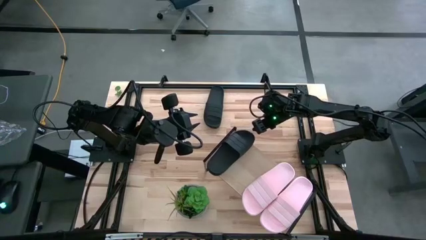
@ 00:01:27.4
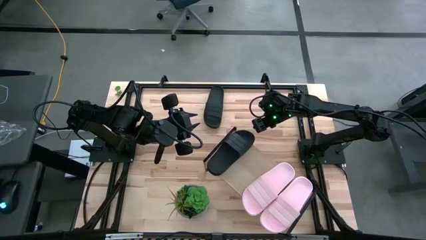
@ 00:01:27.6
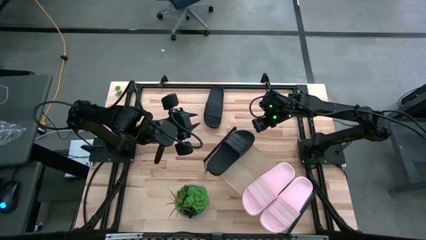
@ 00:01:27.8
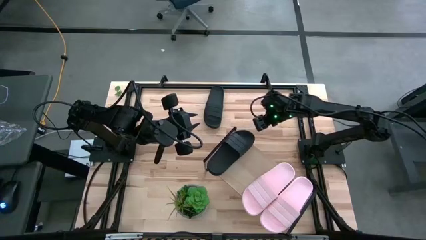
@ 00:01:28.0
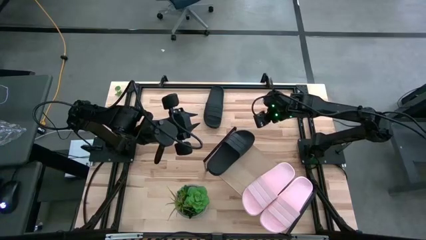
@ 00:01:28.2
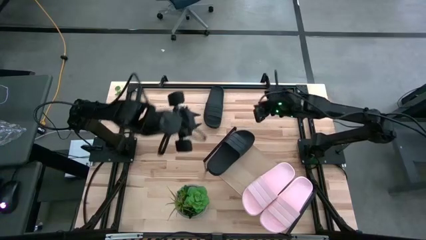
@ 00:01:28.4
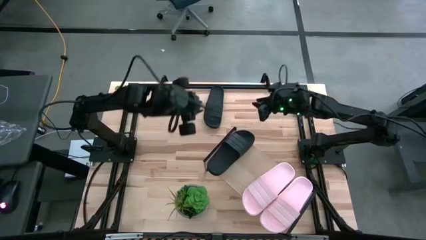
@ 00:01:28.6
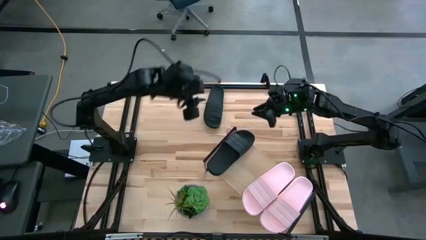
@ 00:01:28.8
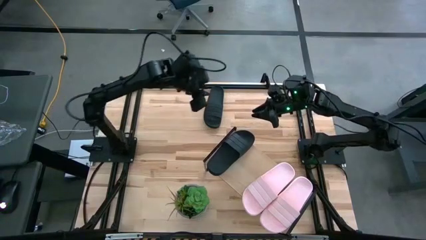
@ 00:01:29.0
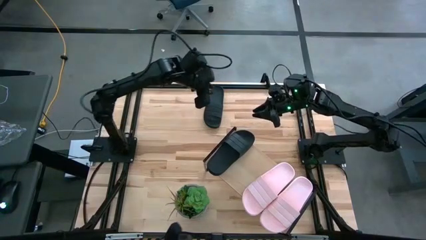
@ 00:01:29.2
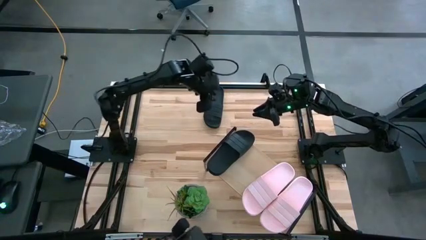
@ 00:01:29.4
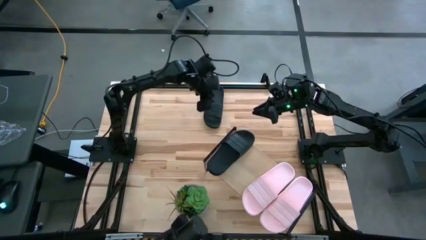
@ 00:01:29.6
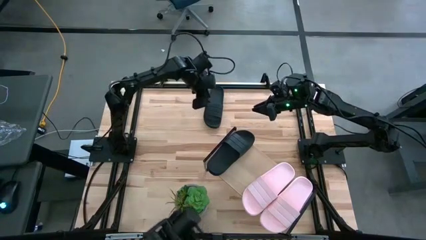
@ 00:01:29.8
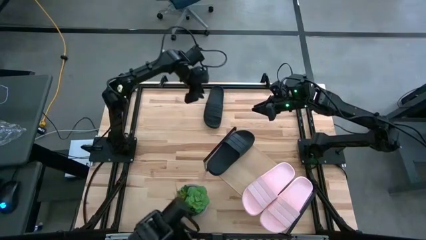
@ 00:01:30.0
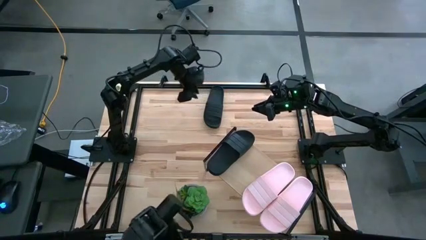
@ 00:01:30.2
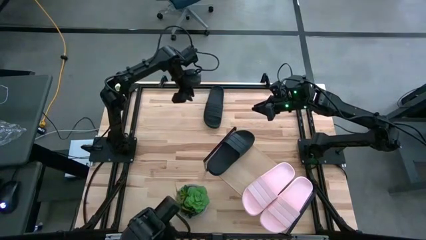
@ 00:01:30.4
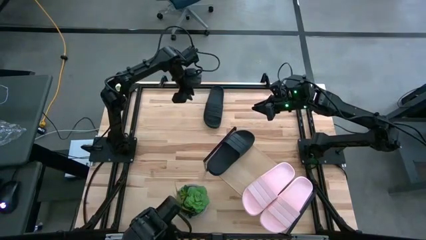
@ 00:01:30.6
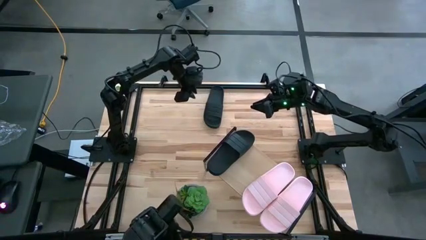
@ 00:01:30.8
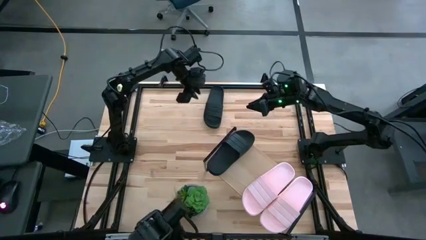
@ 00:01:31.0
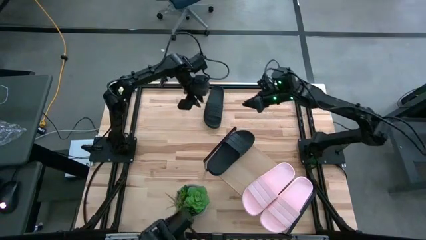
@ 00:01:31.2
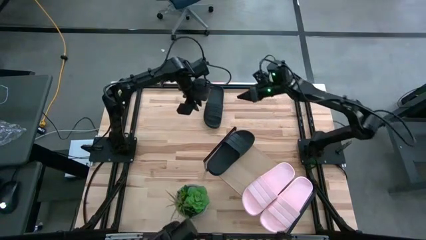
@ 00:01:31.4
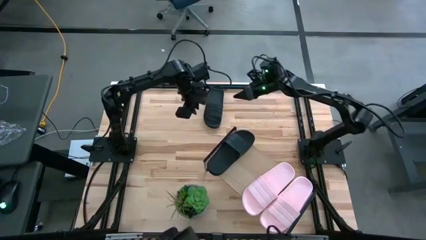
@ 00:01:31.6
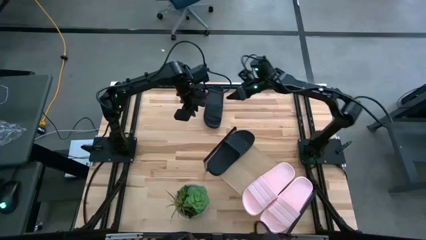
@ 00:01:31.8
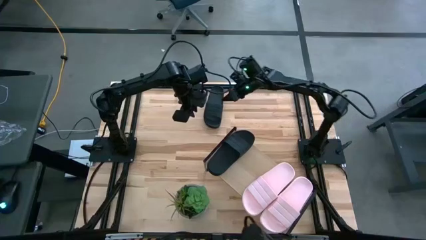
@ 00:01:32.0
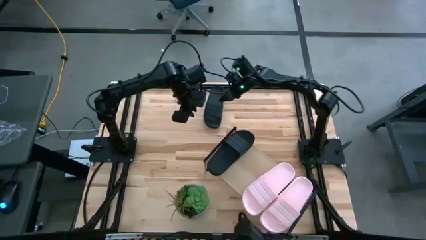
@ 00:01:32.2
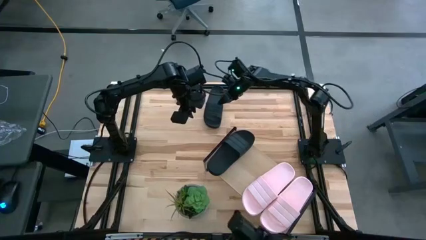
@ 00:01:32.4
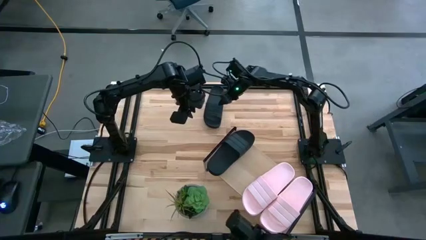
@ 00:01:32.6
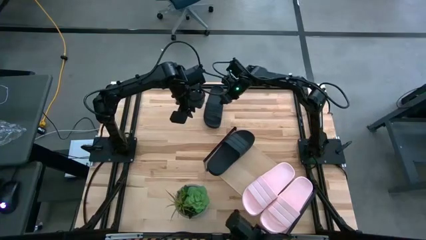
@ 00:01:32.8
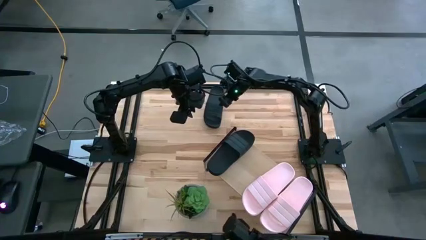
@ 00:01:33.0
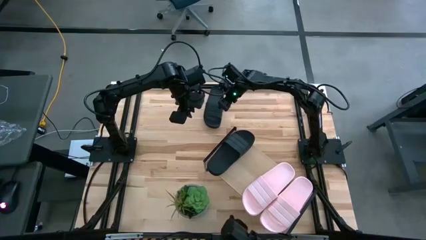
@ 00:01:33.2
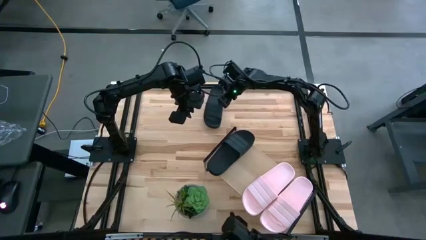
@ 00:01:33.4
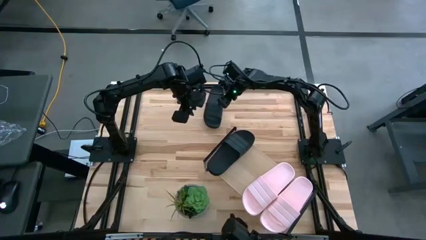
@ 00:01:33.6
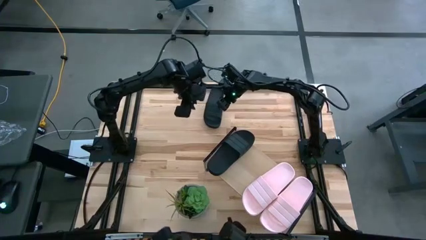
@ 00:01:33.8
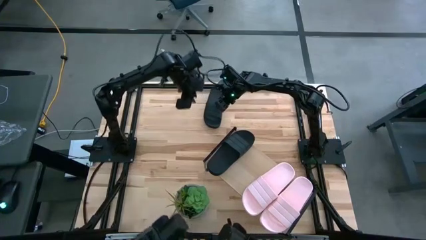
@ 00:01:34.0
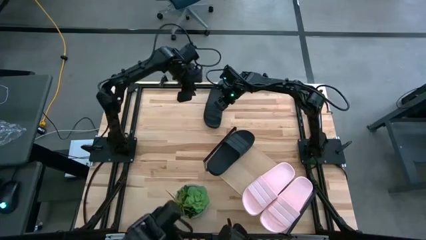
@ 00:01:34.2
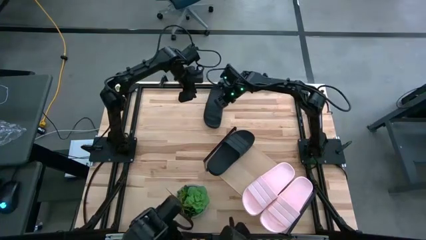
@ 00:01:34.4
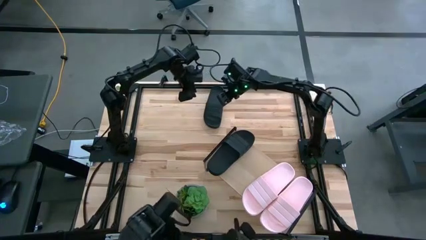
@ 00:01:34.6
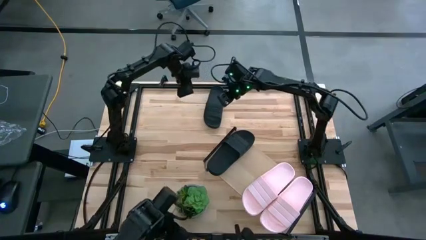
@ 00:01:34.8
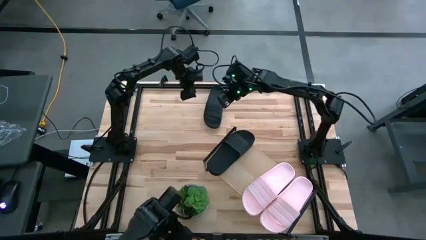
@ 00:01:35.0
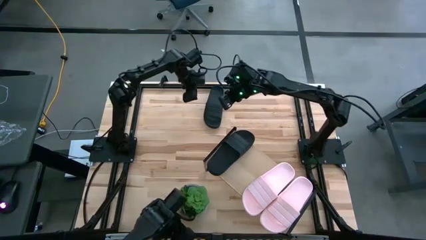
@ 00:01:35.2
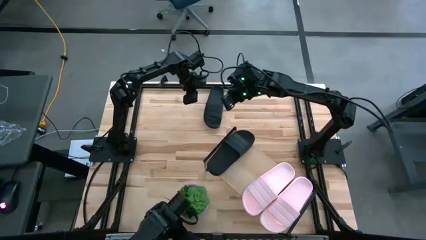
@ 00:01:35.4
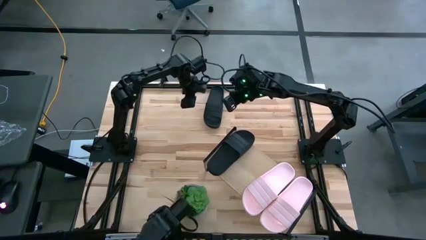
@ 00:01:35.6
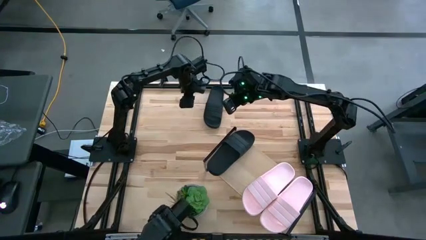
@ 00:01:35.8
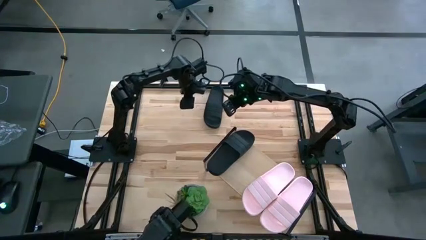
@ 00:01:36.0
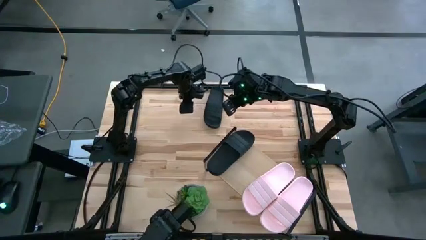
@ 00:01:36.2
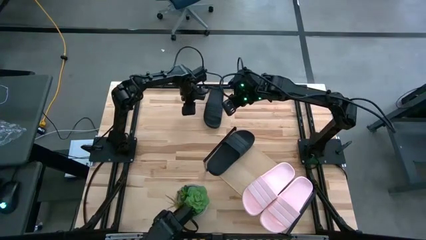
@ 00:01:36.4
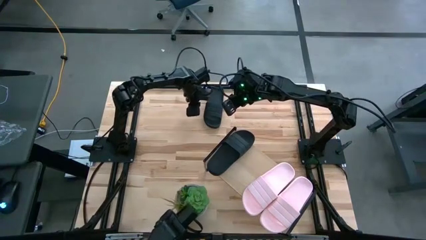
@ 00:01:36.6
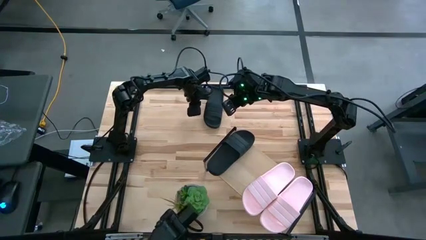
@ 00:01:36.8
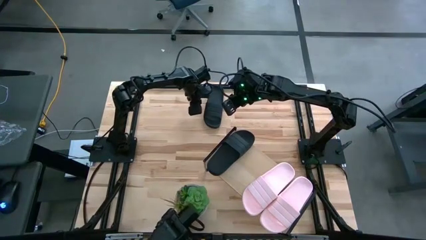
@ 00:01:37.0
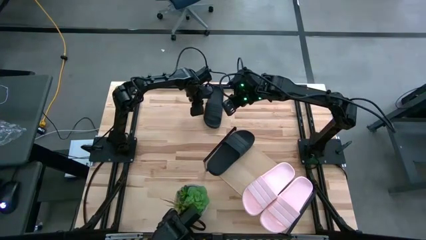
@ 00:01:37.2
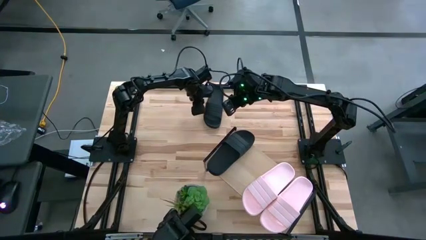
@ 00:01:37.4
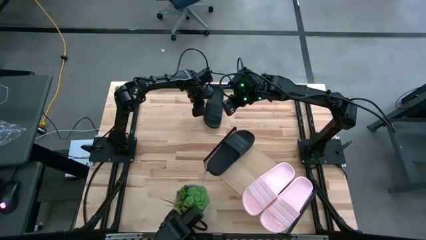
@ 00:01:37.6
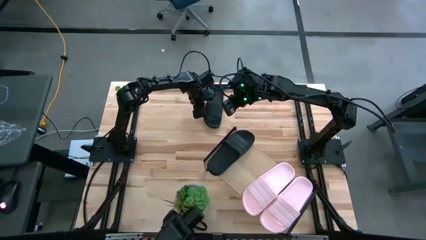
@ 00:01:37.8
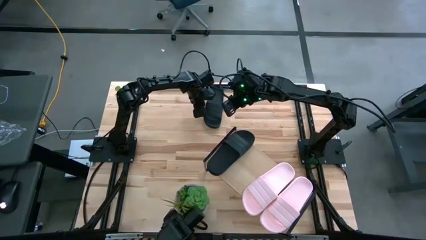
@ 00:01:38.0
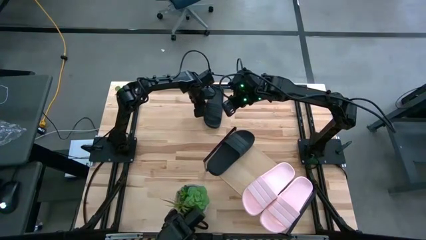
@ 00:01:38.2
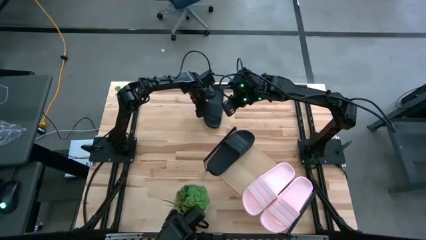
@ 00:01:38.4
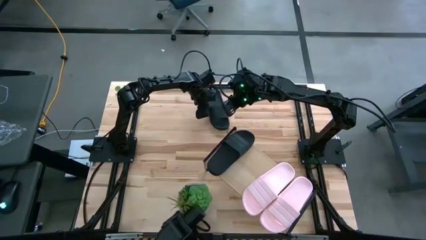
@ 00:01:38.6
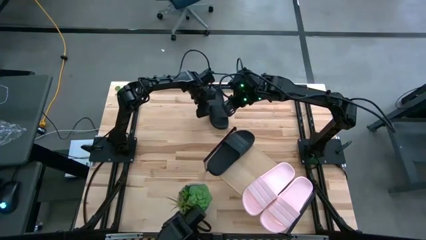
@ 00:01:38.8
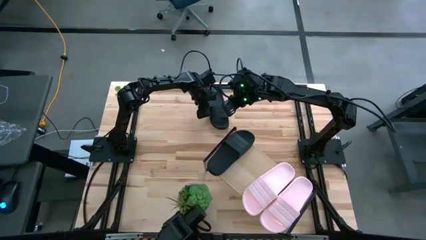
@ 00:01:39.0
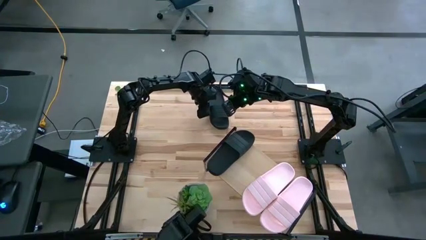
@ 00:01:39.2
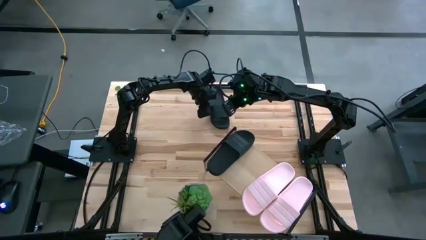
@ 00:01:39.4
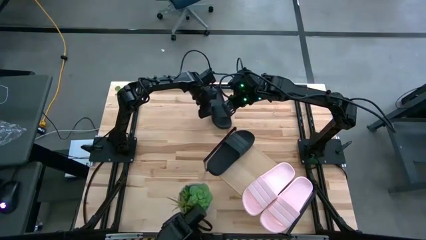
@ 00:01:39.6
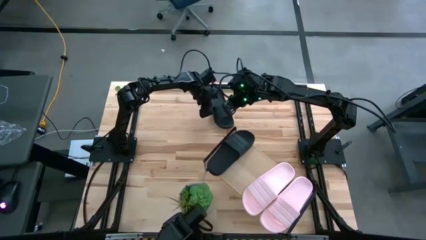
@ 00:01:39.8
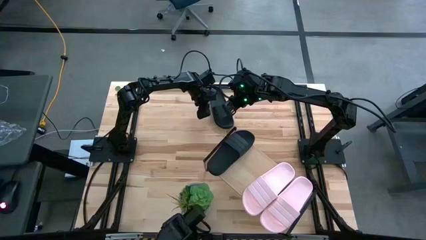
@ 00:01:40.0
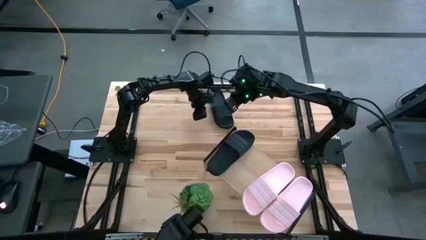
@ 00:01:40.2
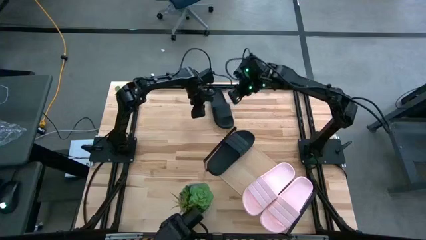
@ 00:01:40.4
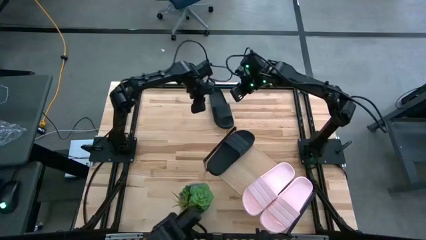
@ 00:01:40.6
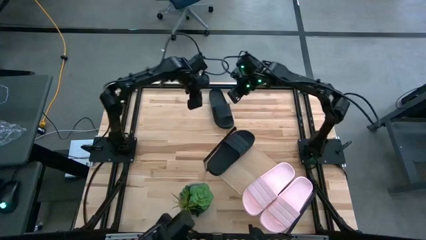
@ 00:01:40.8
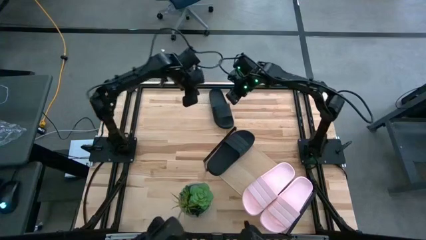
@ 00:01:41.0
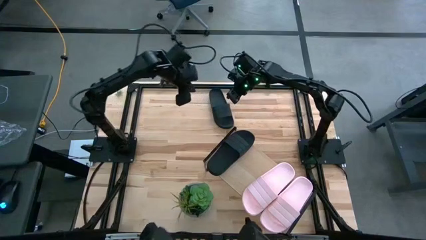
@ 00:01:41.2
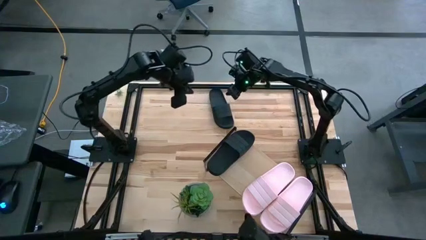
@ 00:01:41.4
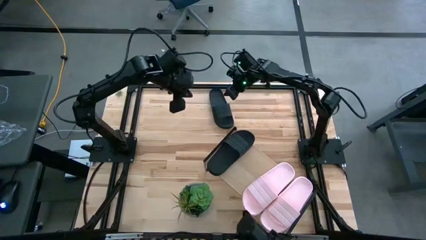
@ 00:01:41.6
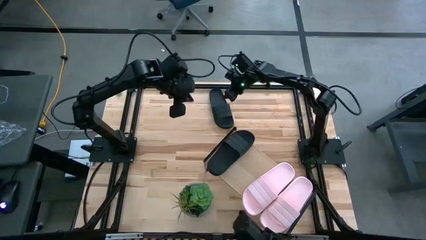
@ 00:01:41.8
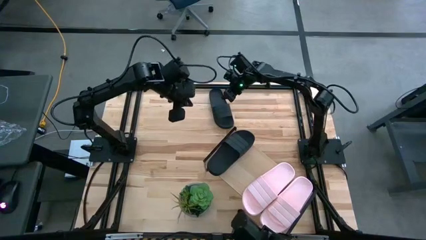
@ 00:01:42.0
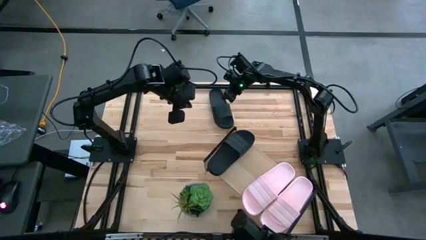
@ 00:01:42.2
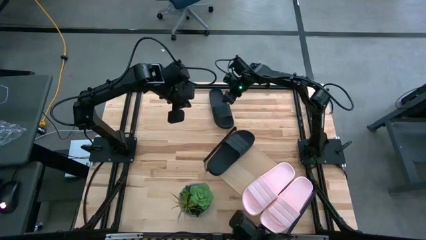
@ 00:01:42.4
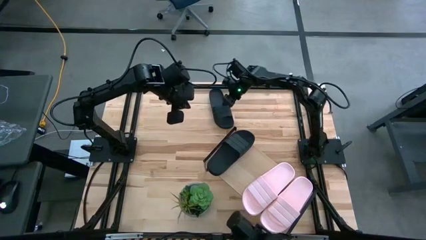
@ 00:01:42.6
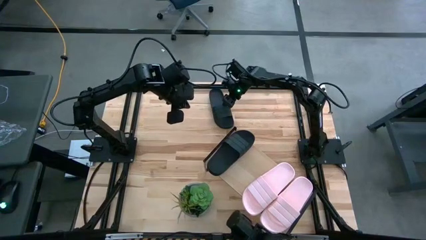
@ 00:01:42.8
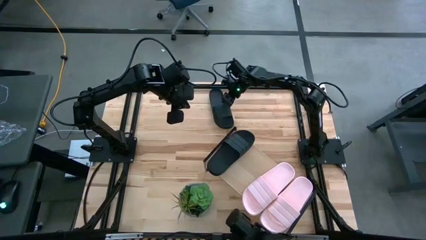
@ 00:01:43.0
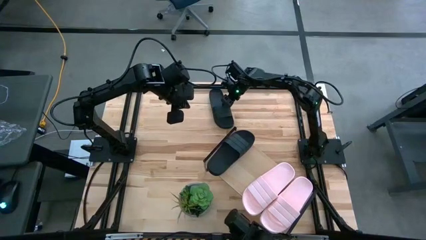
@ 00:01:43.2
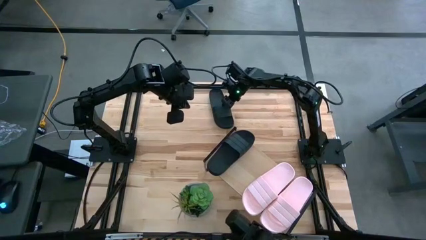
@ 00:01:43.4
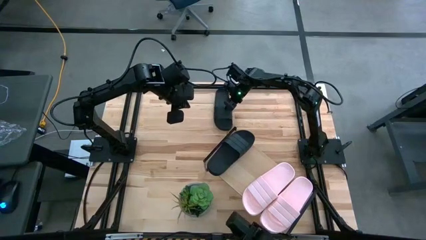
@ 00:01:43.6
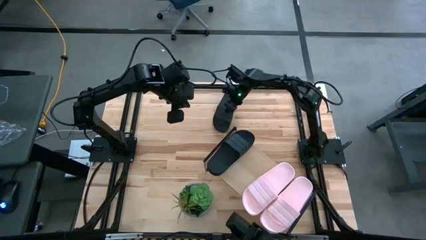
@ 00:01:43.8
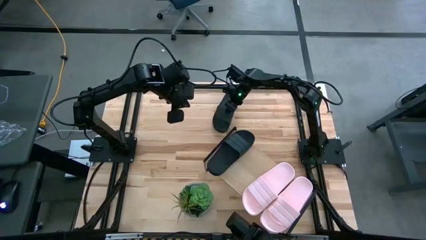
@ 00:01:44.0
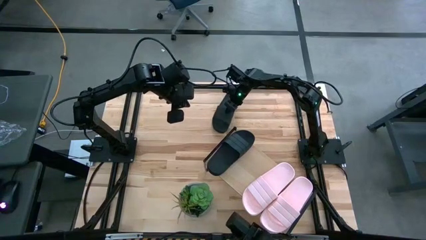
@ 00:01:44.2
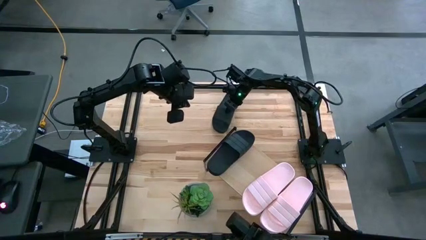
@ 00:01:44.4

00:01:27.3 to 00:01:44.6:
Task: Pick and place slides into the shelf
Put the black slides on the shelf
